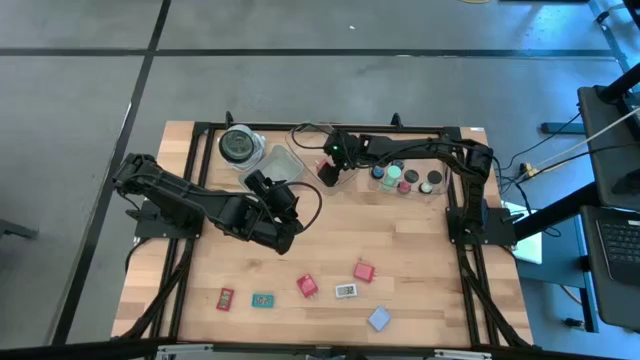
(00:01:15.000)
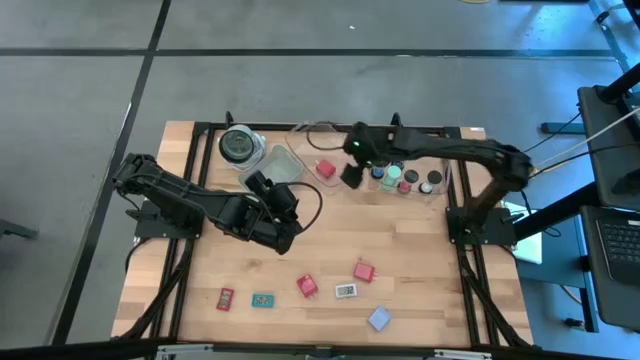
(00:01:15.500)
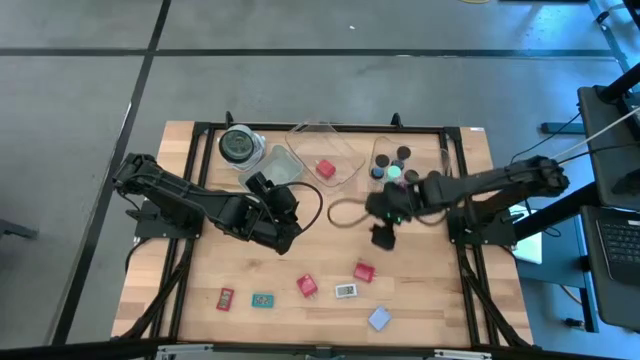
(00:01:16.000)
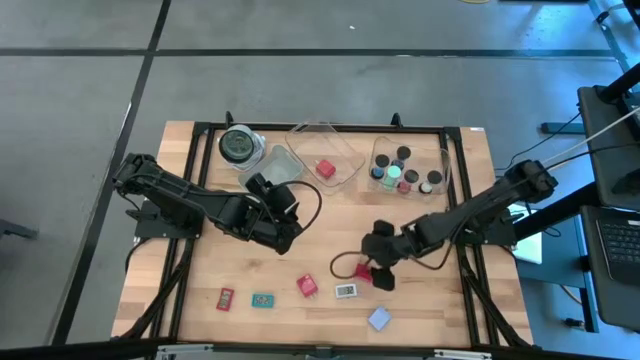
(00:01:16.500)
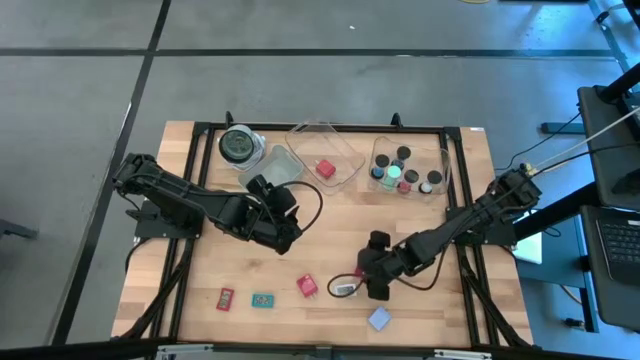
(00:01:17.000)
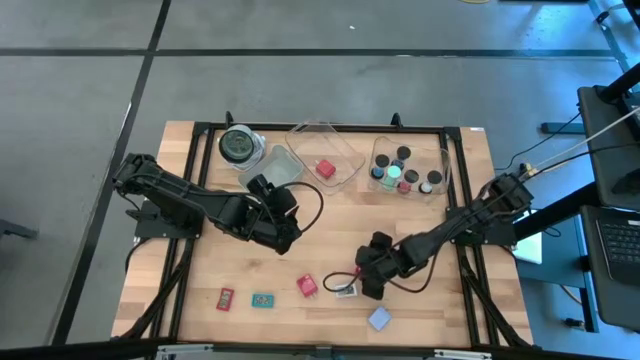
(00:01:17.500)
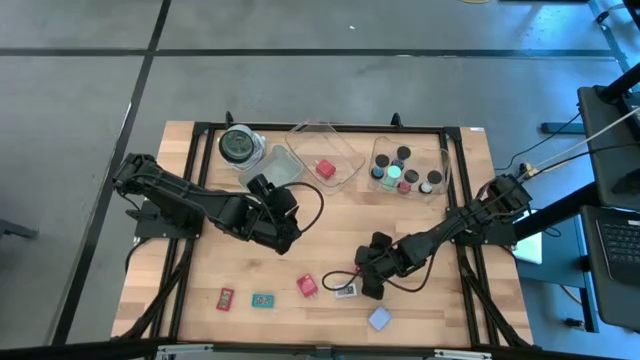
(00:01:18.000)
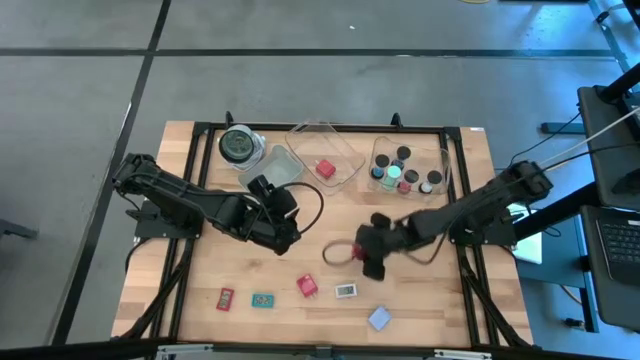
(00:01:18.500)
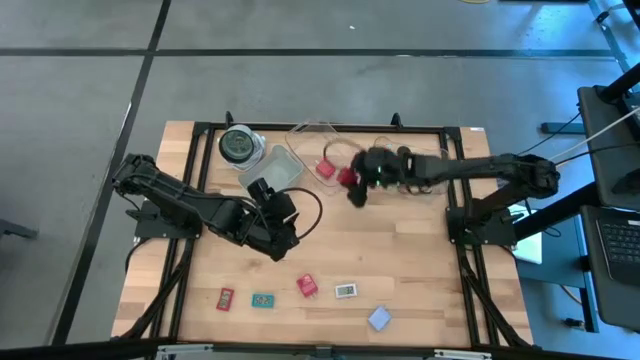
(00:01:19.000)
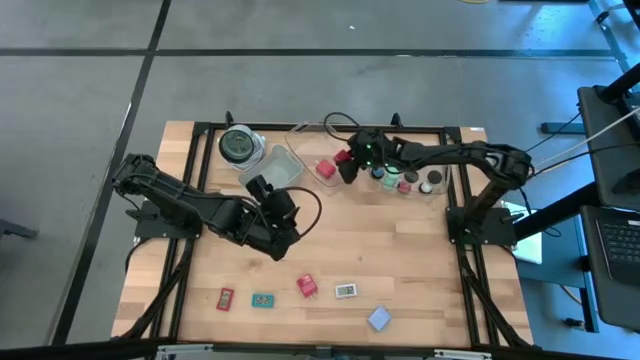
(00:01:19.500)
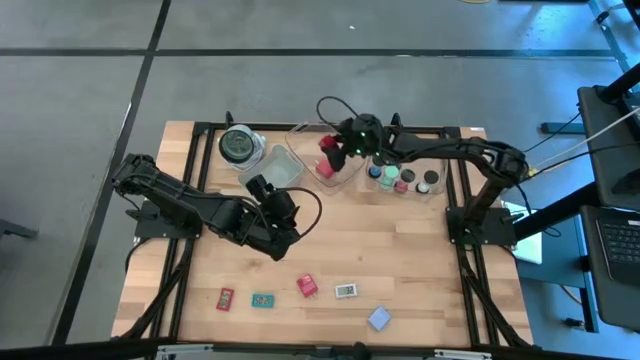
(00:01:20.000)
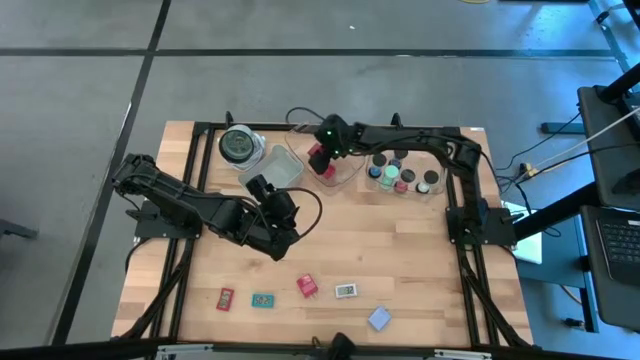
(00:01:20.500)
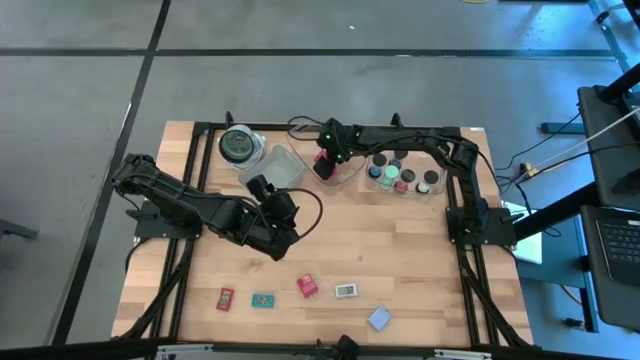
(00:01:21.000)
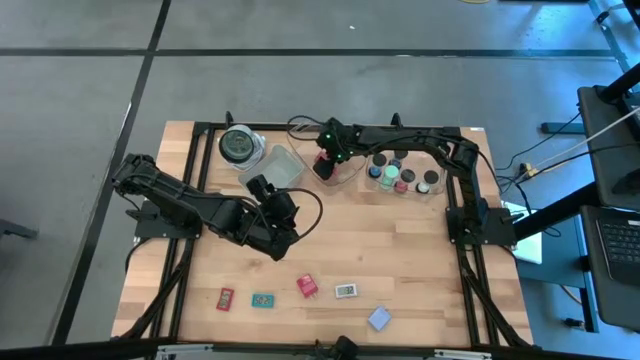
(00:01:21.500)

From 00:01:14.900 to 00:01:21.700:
Task: Pick & Place Office items
Put the right red charger adapter into the left transparent bin

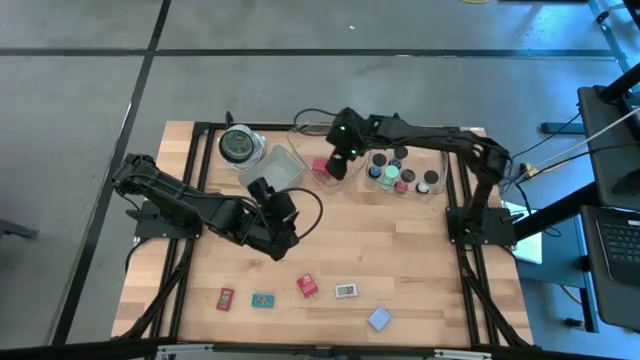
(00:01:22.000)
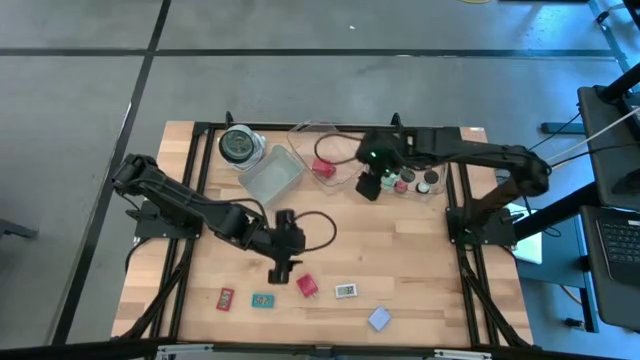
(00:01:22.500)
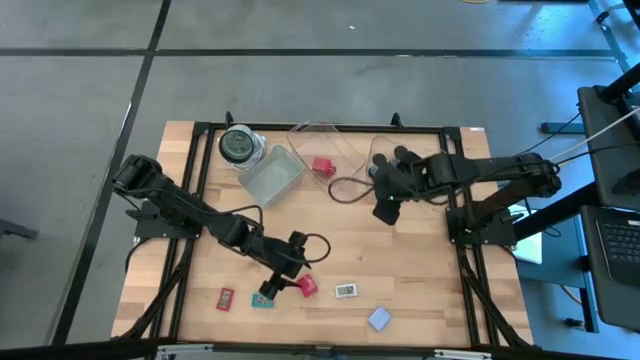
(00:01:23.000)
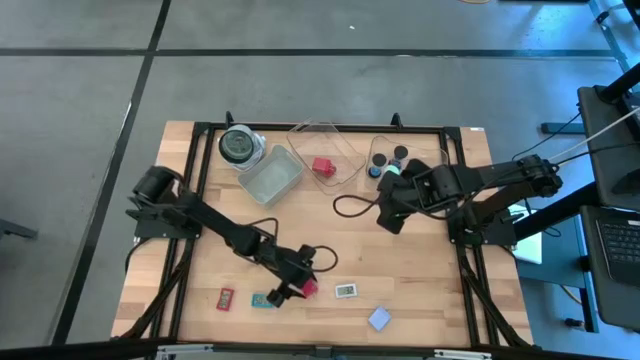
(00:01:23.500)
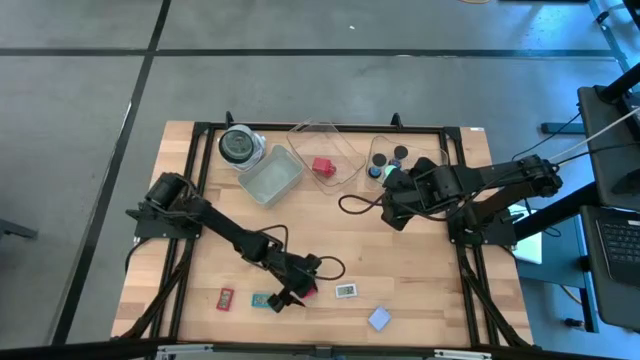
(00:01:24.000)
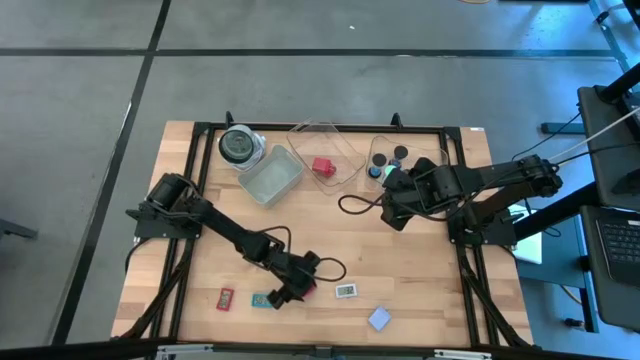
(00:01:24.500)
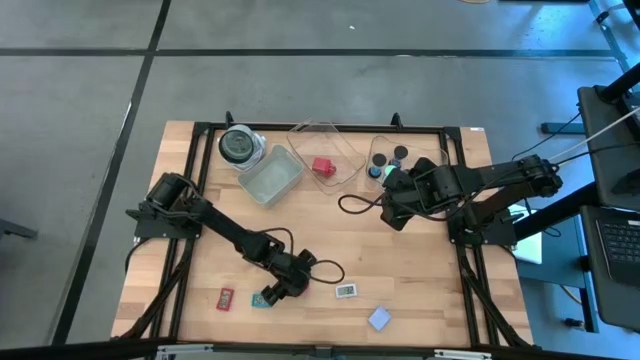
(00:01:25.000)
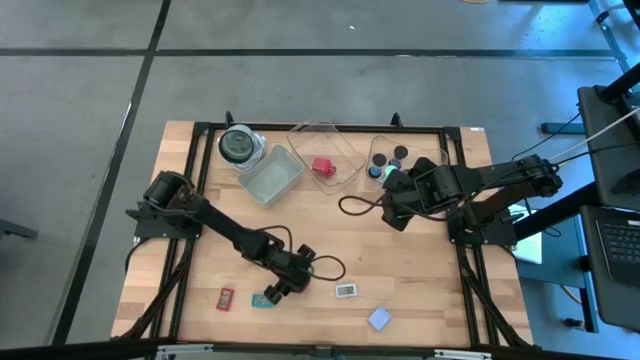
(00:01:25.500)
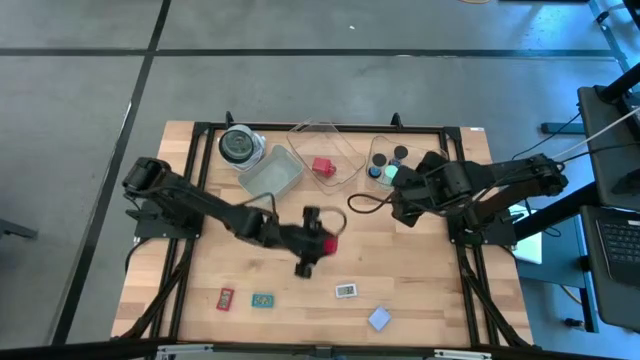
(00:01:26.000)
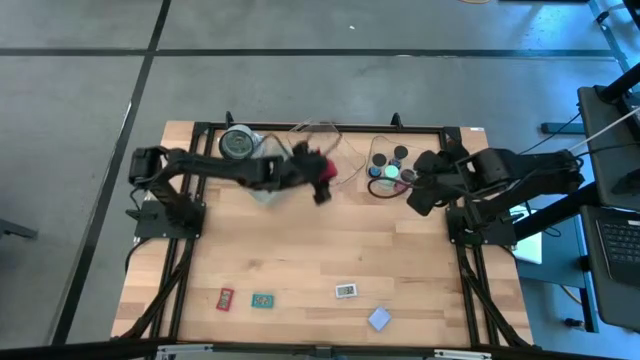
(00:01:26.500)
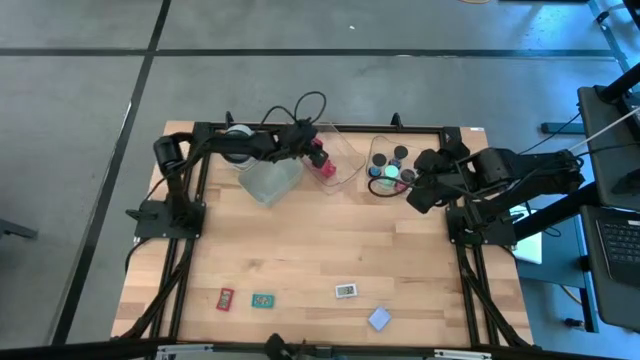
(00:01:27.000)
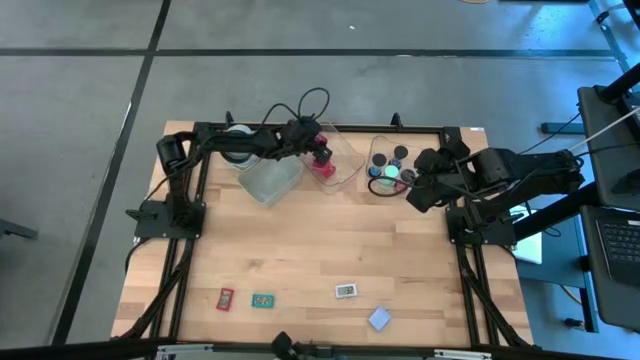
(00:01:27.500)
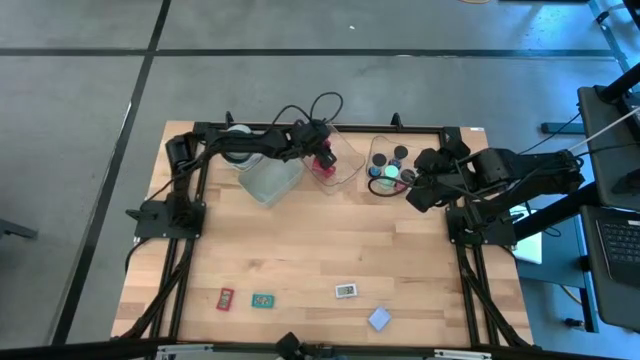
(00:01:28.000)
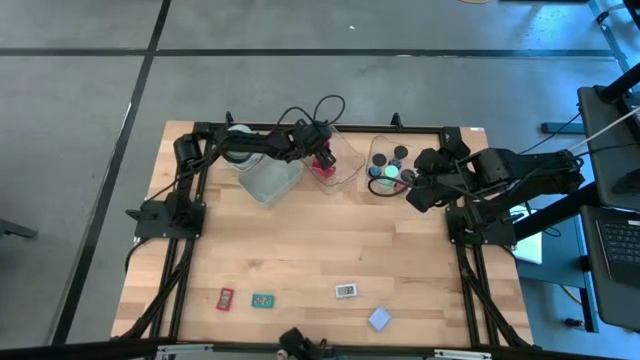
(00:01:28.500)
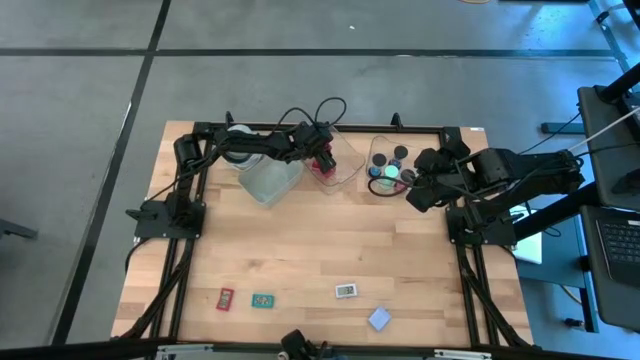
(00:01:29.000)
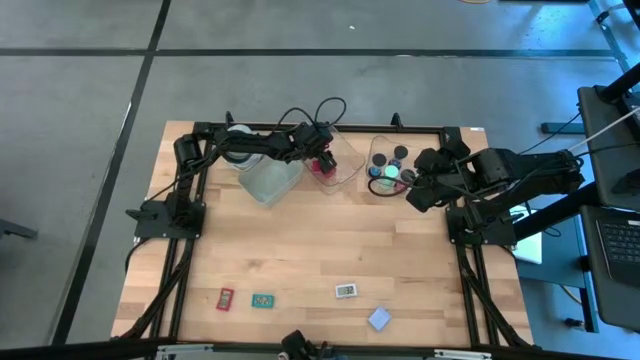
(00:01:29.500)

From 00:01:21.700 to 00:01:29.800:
Put the red charger adapter into the left transparent bin

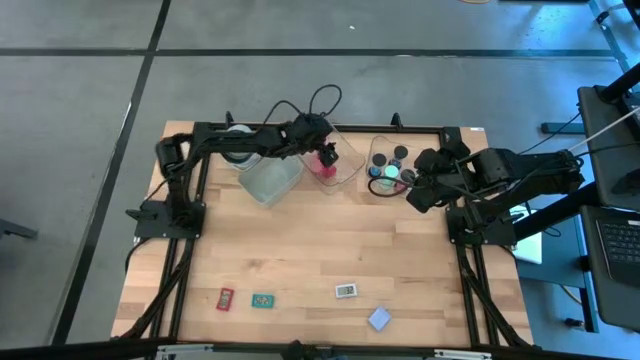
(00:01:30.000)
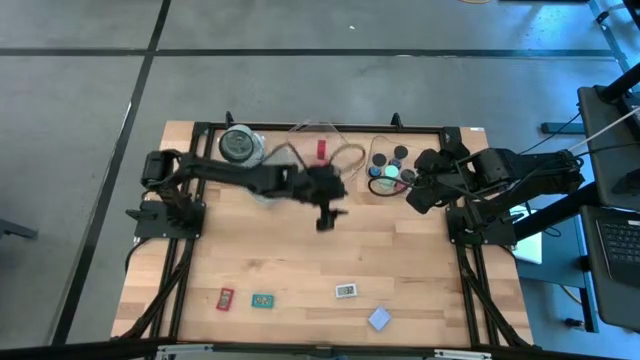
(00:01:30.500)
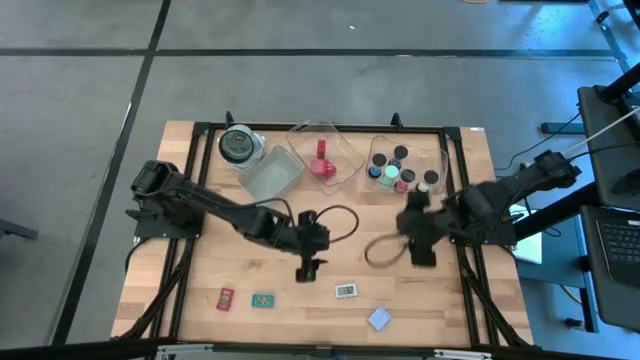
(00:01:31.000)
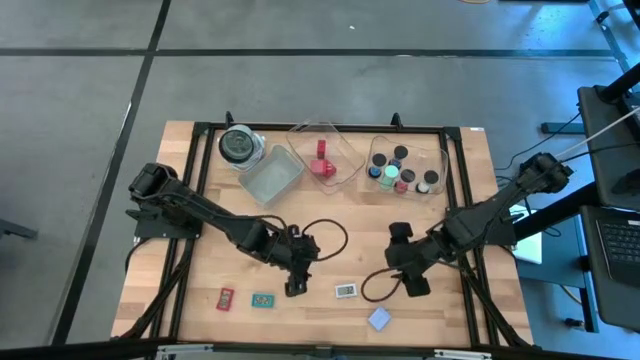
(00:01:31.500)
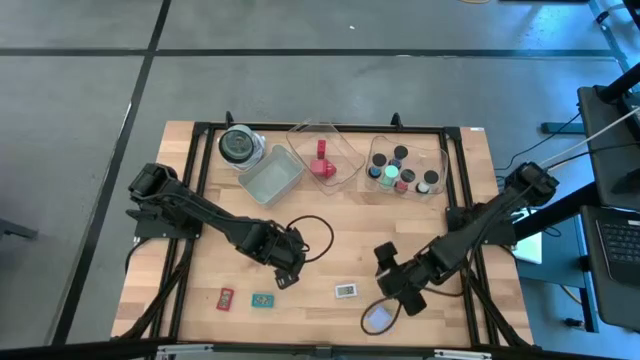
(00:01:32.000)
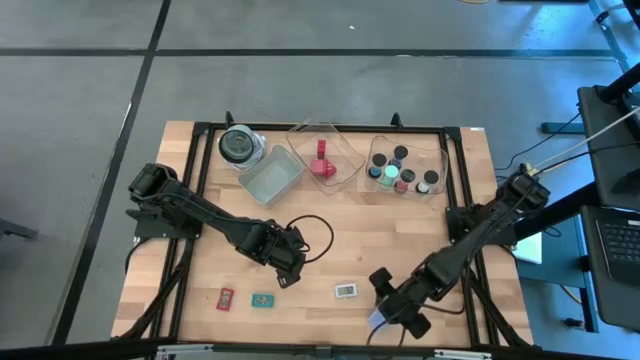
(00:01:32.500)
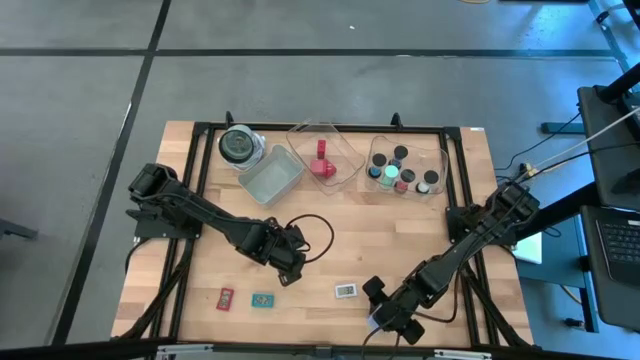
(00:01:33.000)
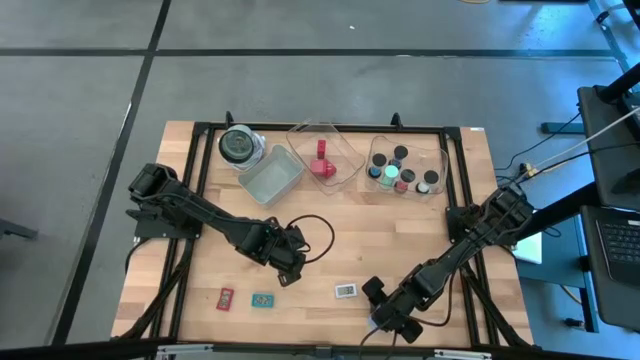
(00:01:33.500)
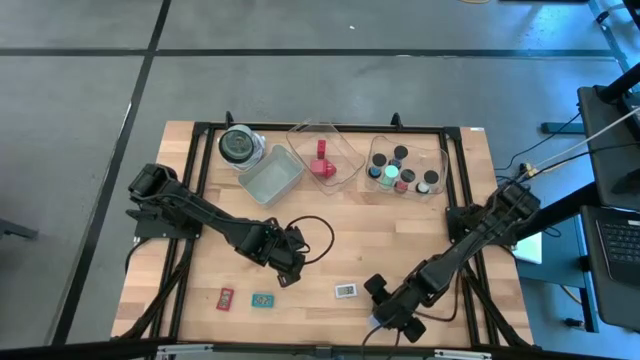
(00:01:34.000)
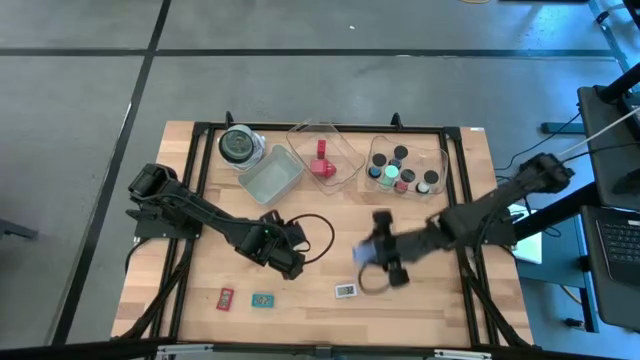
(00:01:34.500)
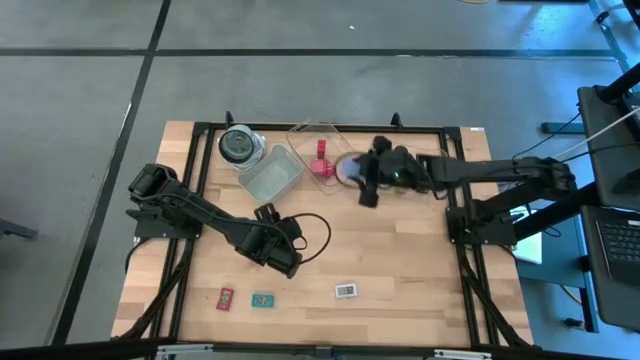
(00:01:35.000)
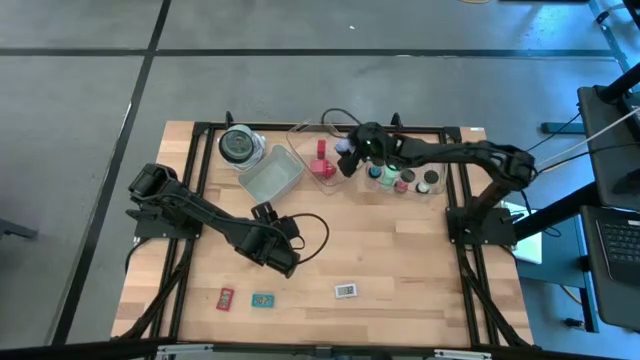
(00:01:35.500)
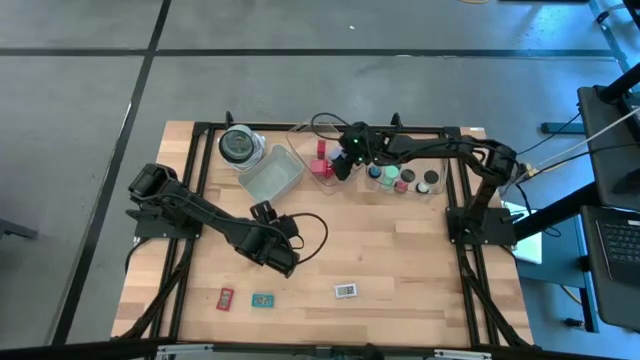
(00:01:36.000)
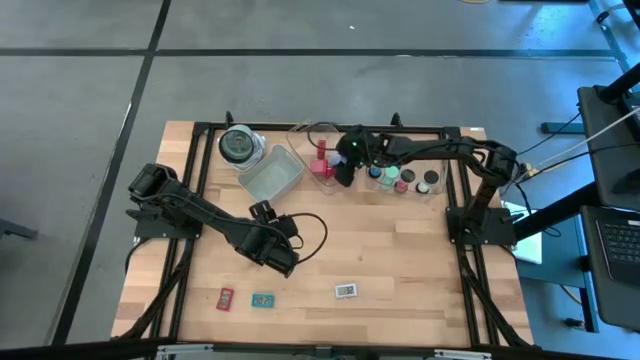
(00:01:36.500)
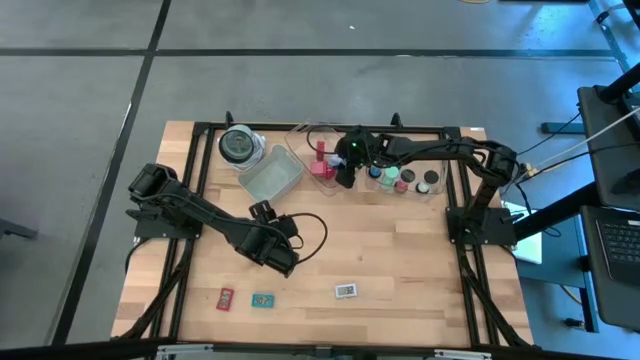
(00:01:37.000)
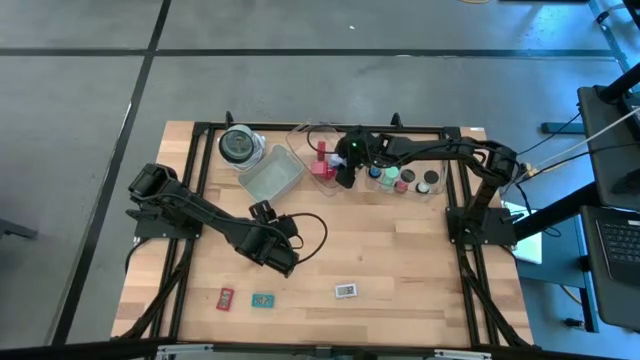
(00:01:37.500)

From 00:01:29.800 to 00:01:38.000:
Put the purple charger adapter into the left transparent bin
